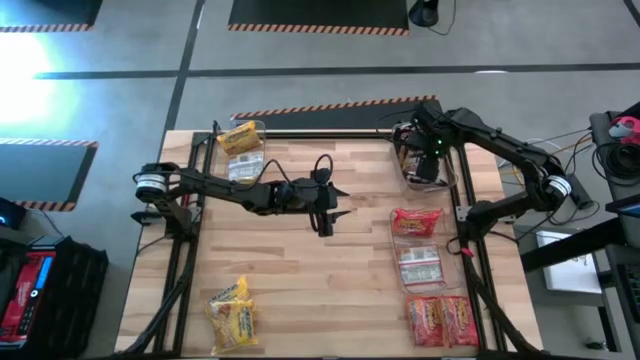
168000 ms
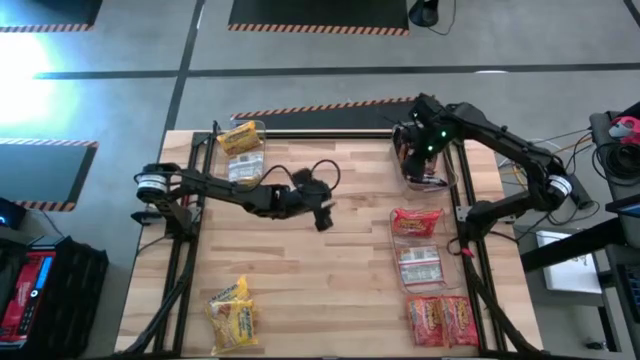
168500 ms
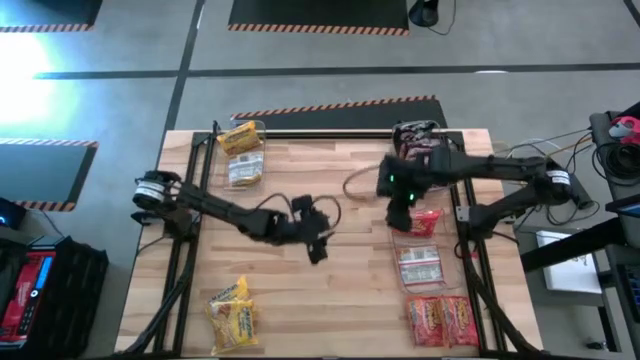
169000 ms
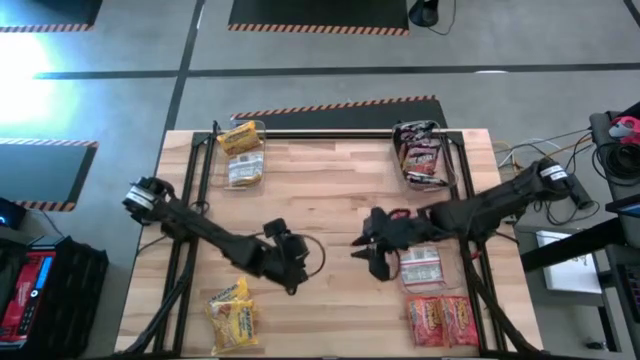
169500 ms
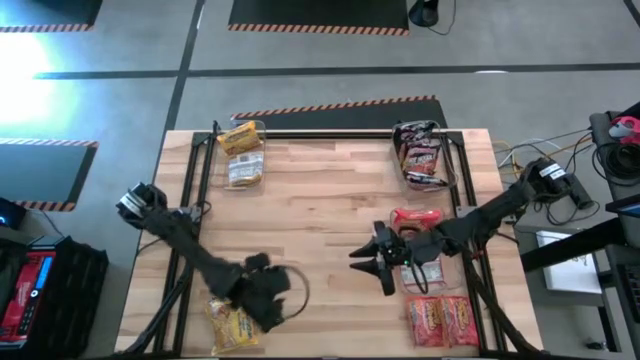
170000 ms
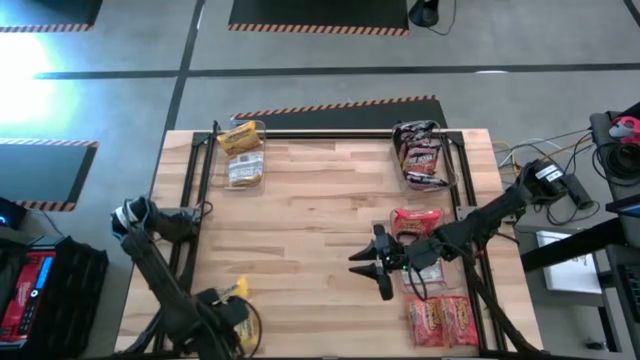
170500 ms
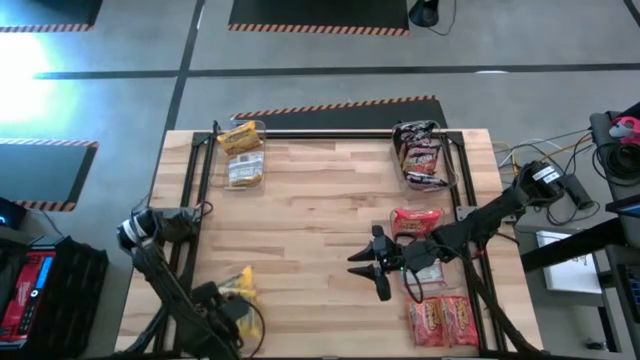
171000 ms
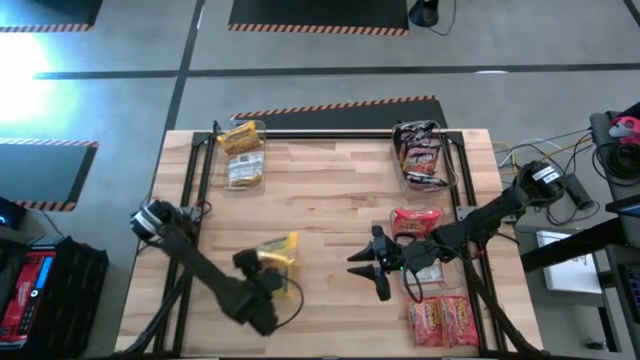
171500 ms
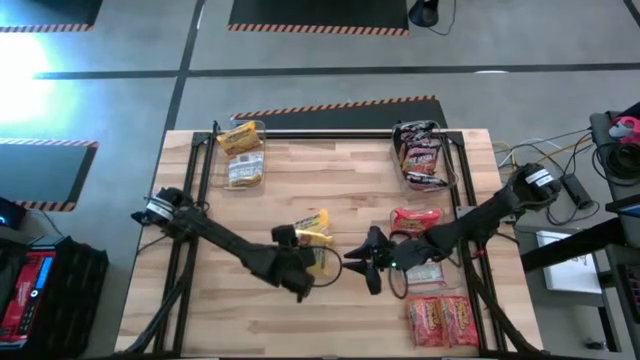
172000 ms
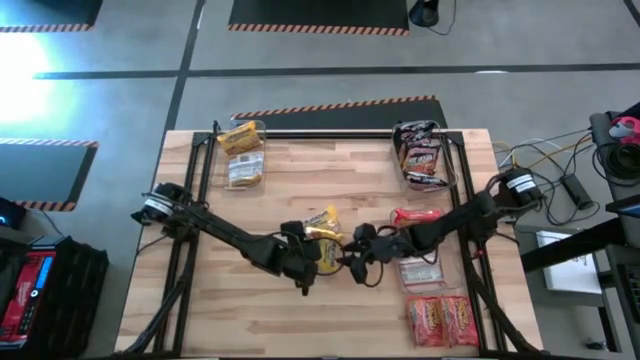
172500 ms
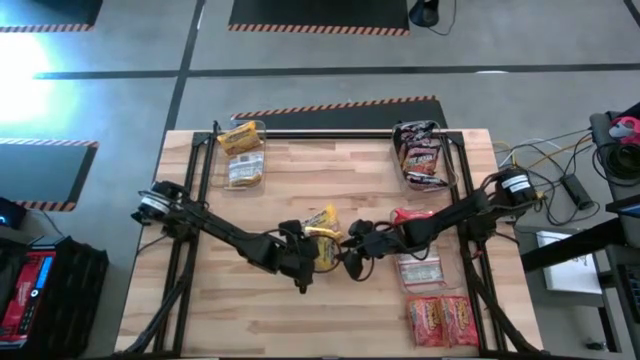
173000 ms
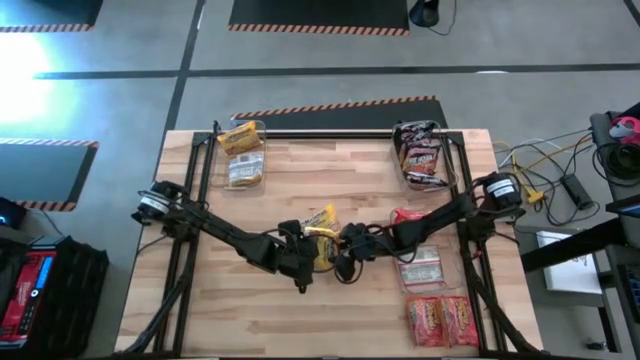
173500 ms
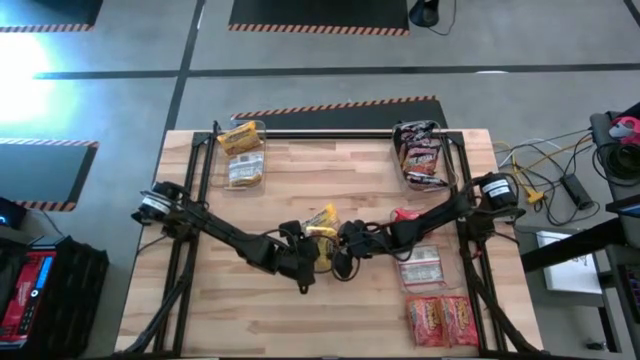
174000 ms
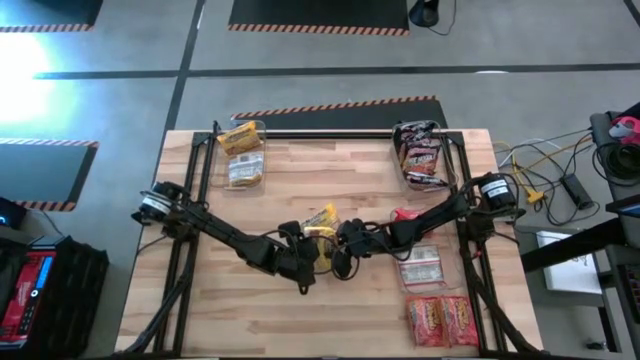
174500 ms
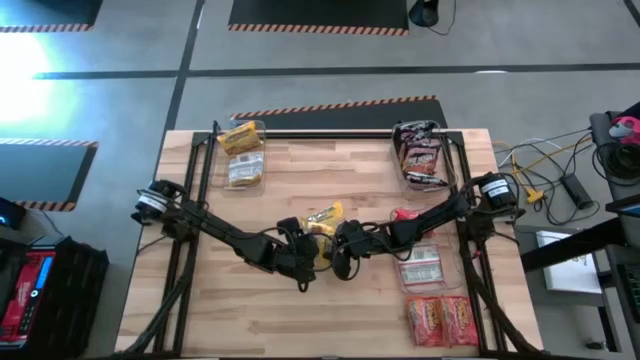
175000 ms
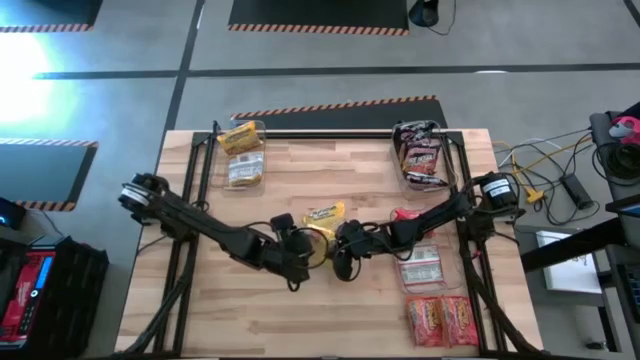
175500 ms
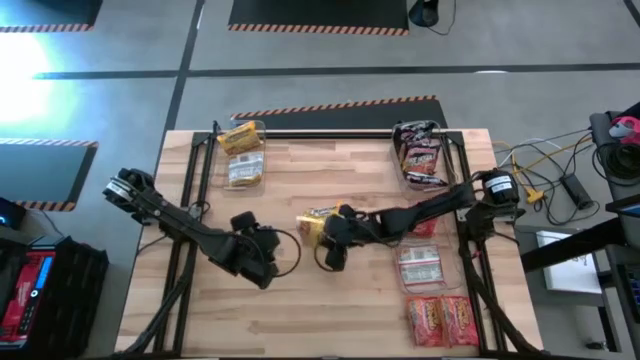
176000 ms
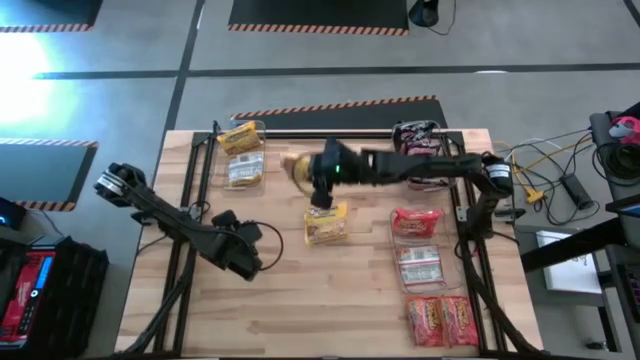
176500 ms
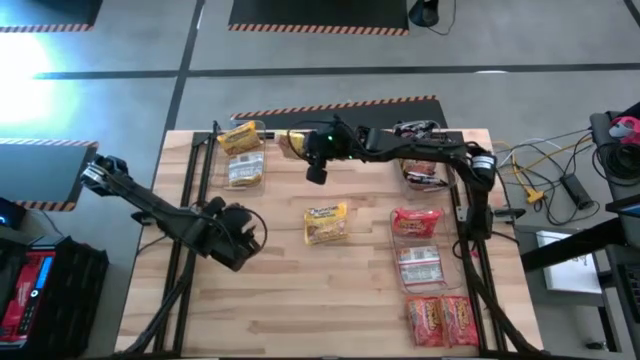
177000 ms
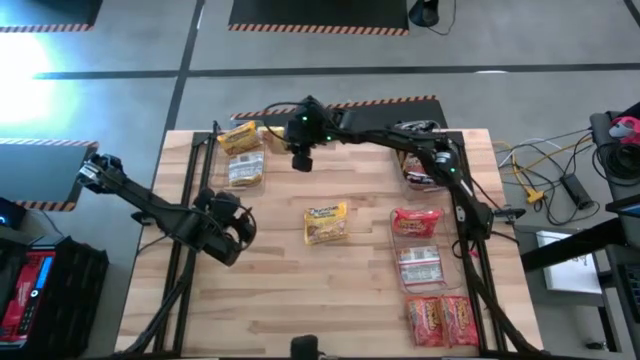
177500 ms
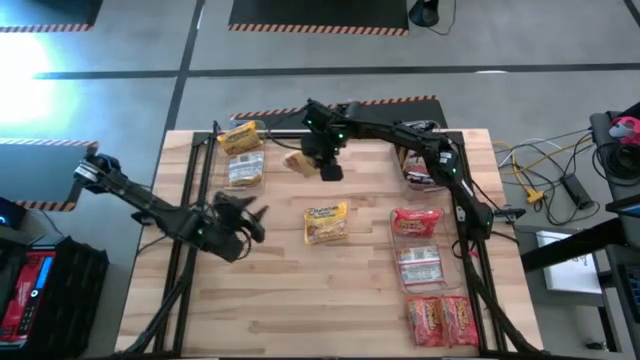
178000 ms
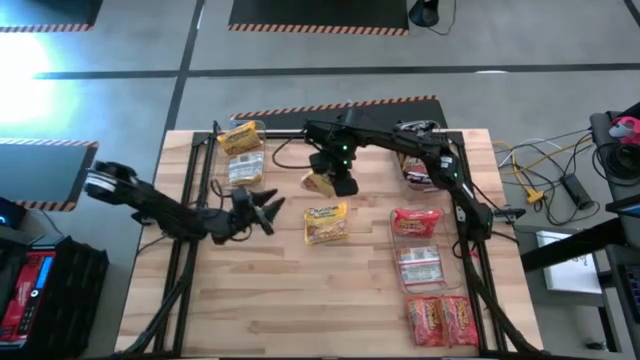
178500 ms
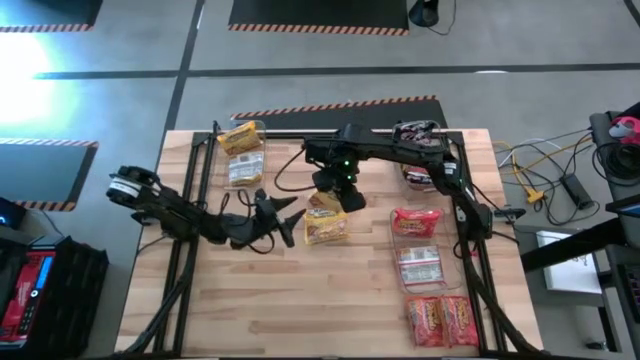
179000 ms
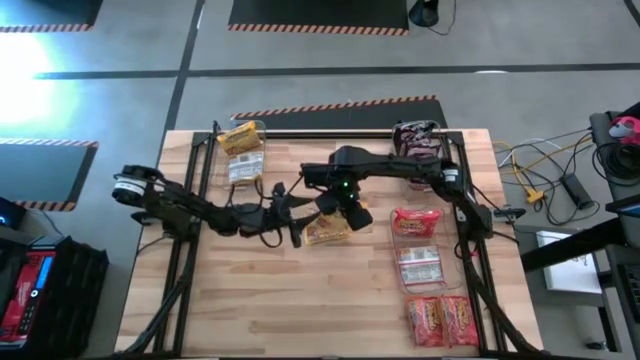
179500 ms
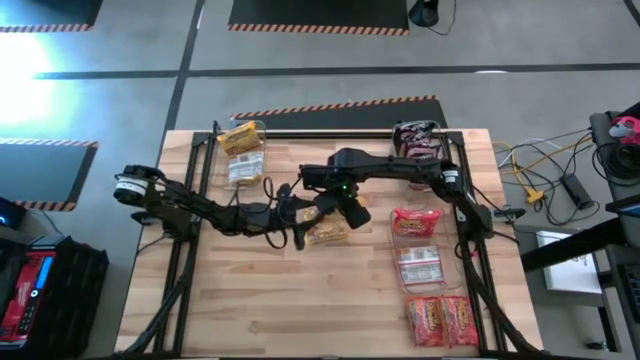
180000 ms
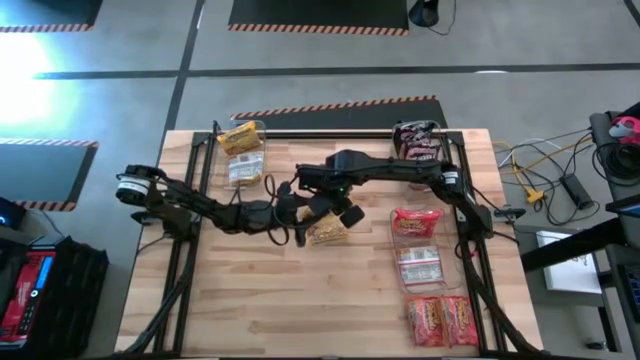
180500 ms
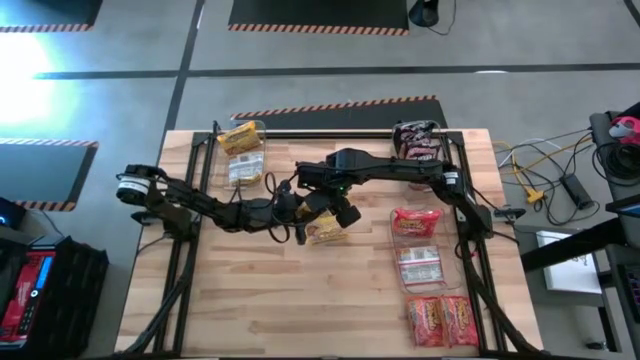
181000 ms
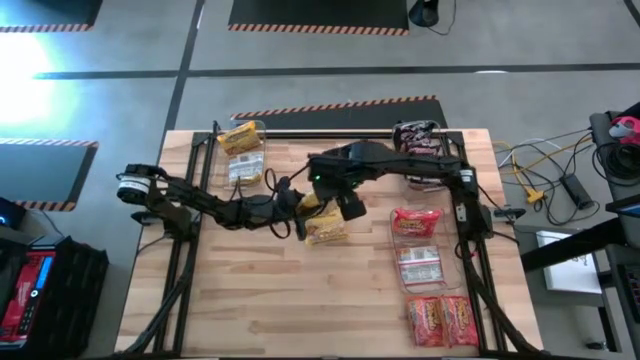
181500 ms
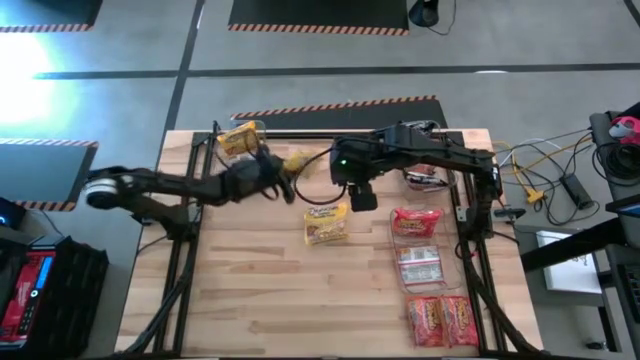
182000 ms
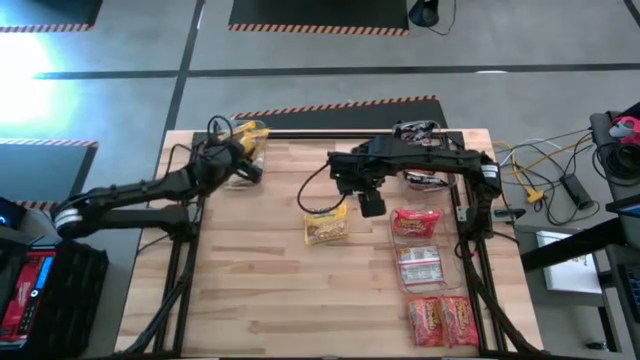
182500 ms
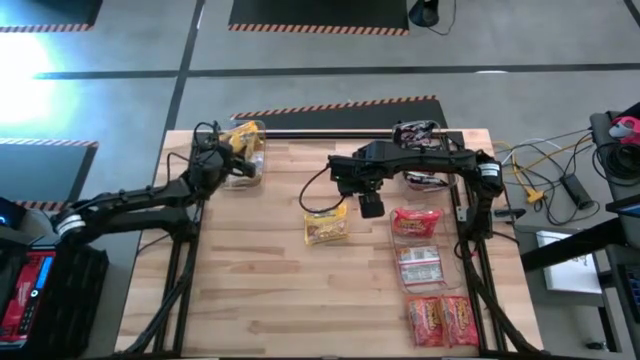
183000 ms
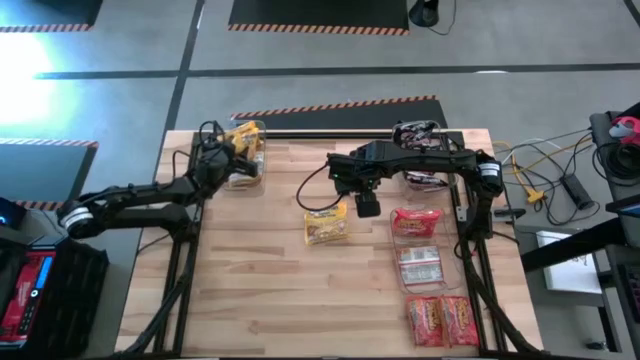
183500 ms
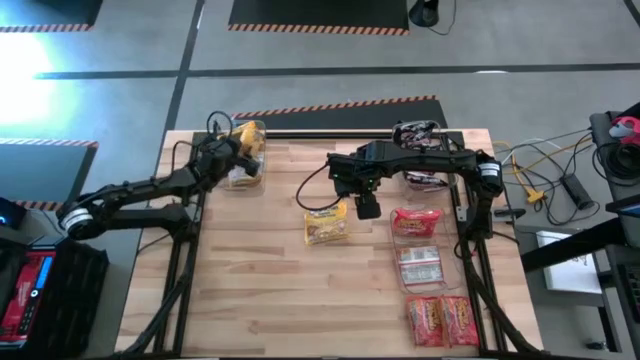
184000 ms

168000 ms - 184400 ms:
Task: Sort Maruchan noodles
Put the yellow noodle pack into the top left transparent bin

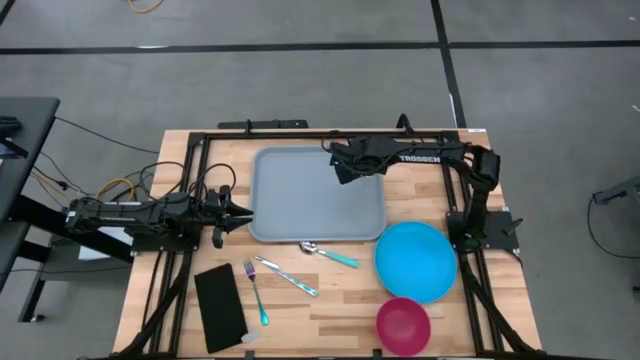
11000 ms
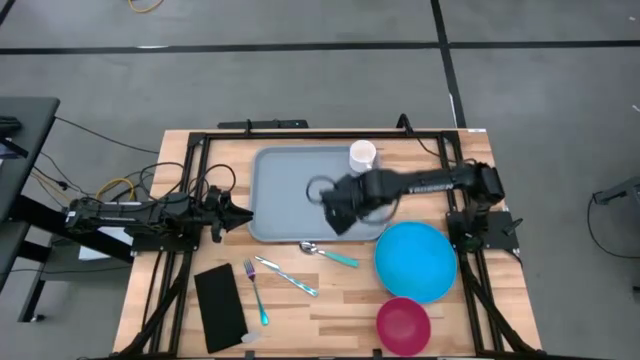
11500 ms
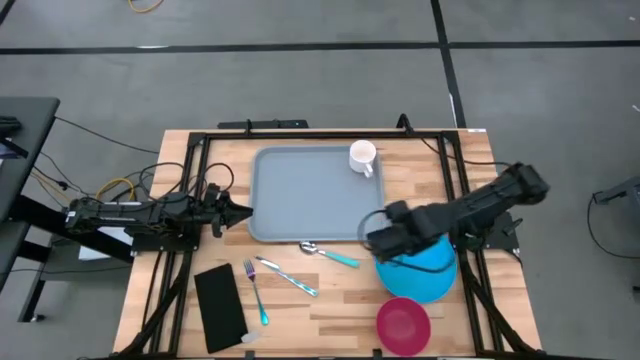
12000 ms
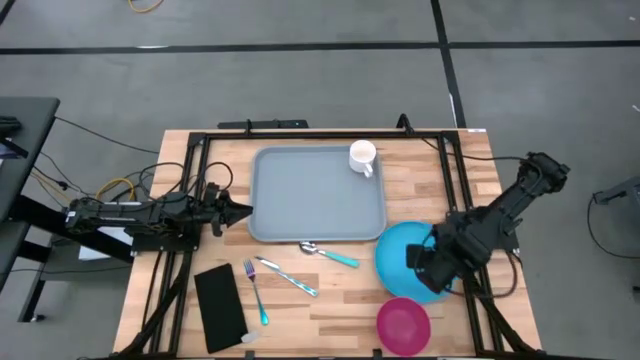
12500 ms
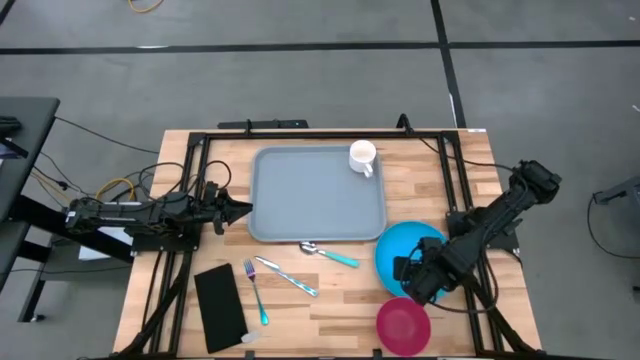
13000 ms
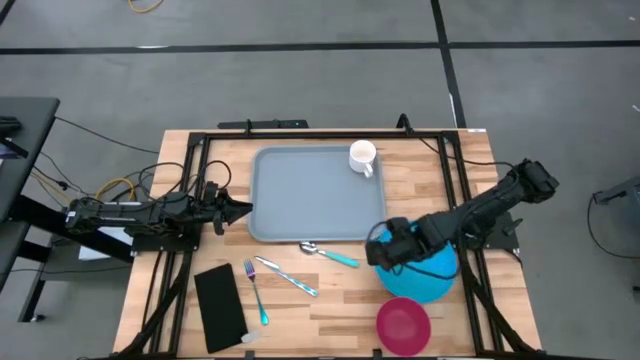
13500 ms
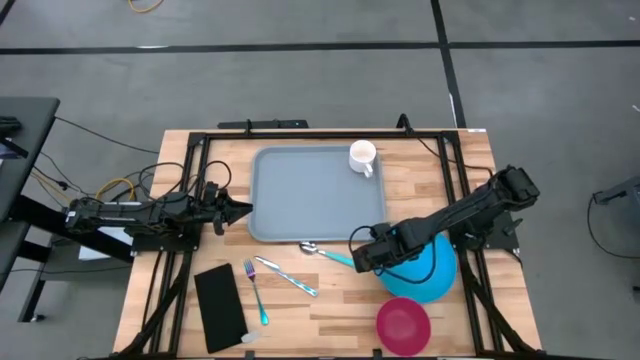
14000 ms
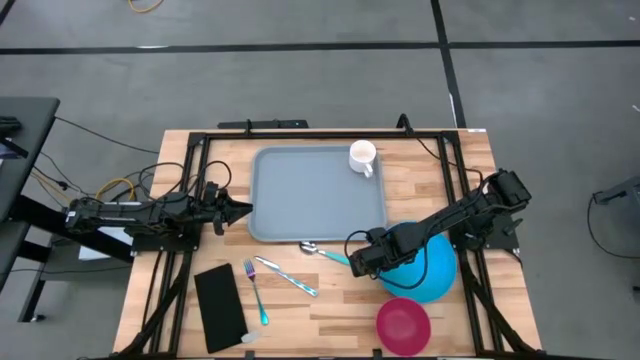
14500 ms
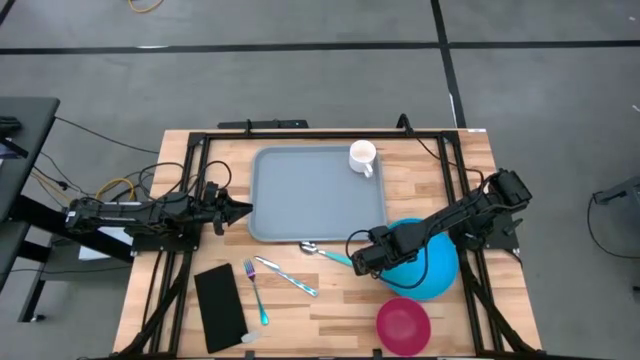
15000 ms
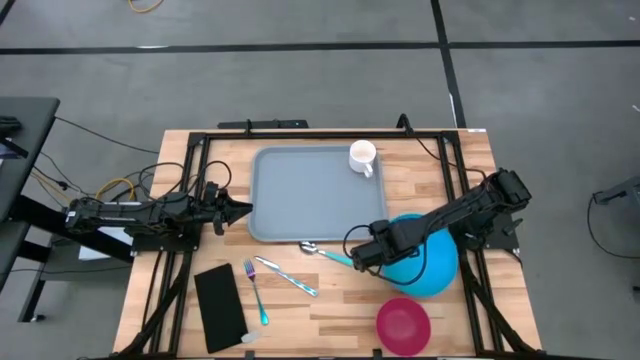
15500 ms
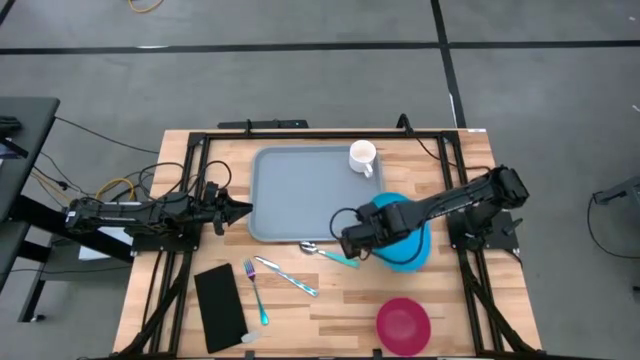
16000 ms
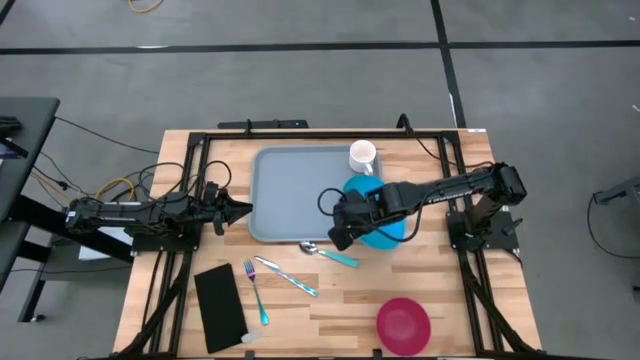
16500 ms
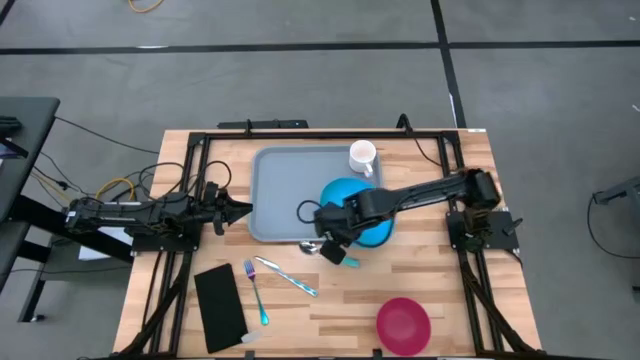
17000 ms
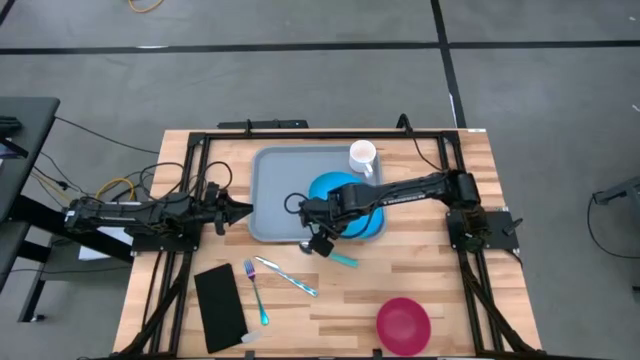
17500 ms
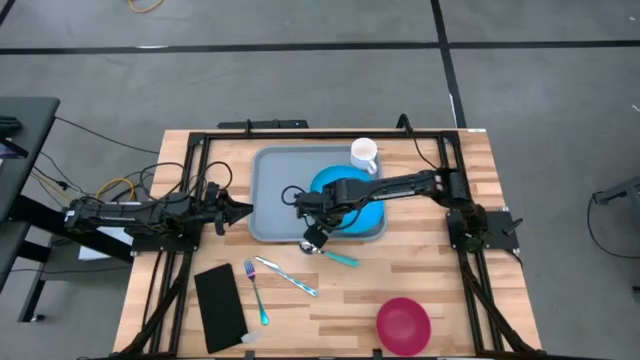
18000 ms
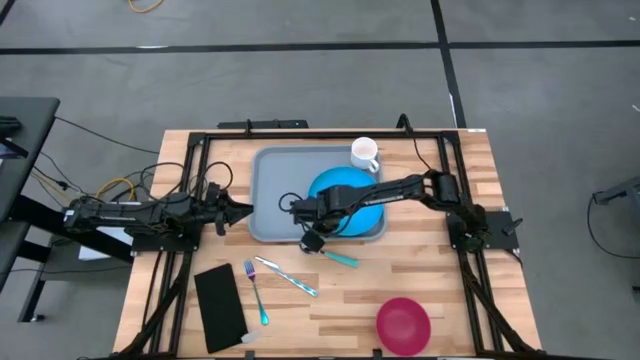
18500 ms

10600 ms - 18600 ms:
Task: Set up tray
Put the blue plate under the white mug on the gray serving tray
